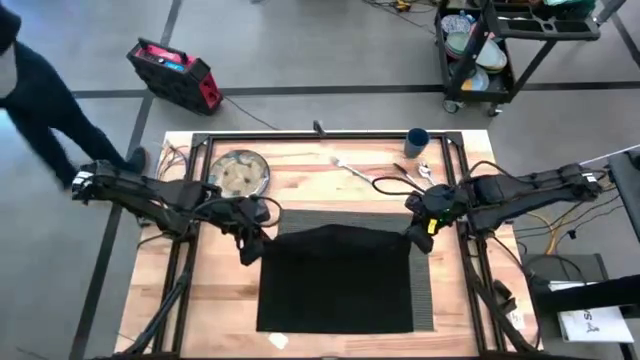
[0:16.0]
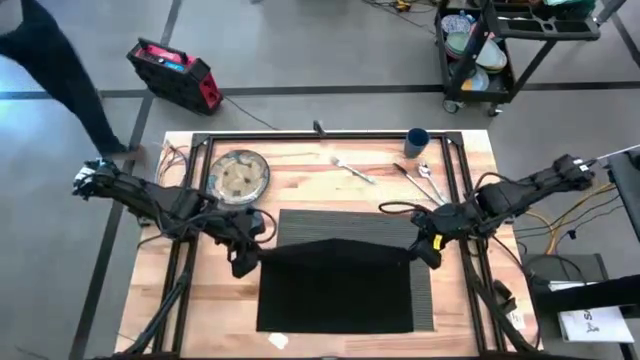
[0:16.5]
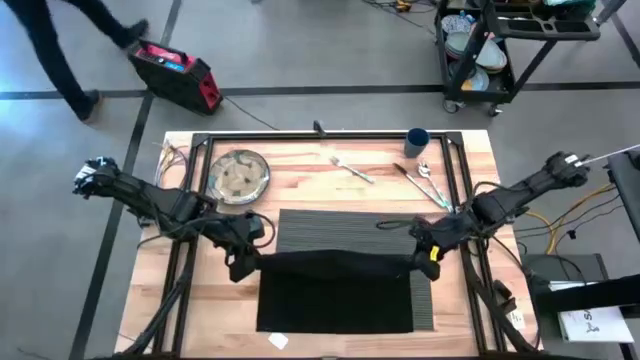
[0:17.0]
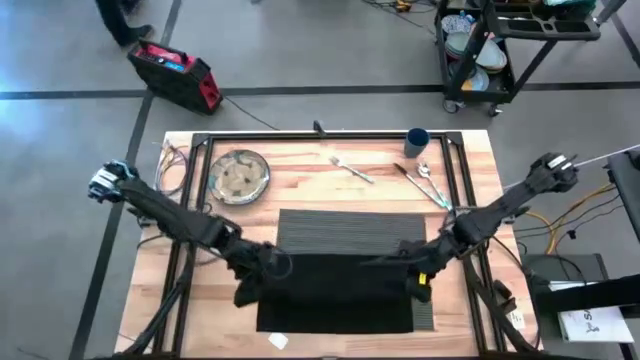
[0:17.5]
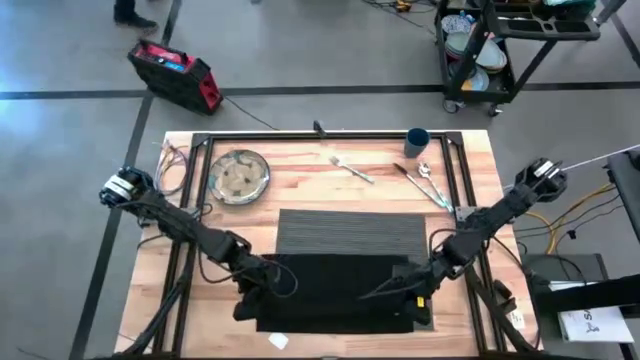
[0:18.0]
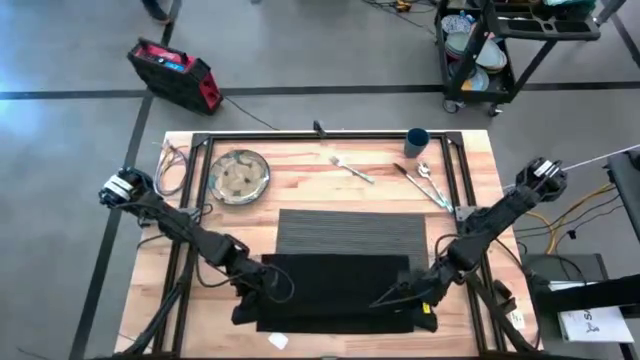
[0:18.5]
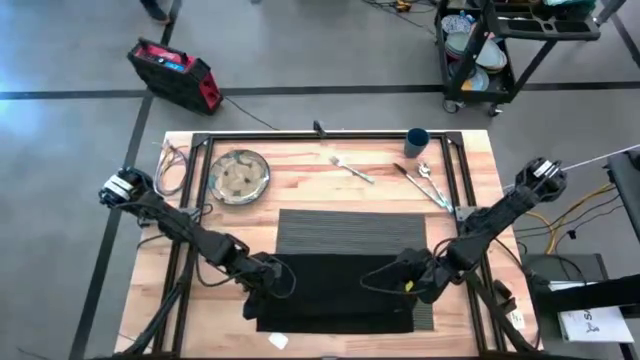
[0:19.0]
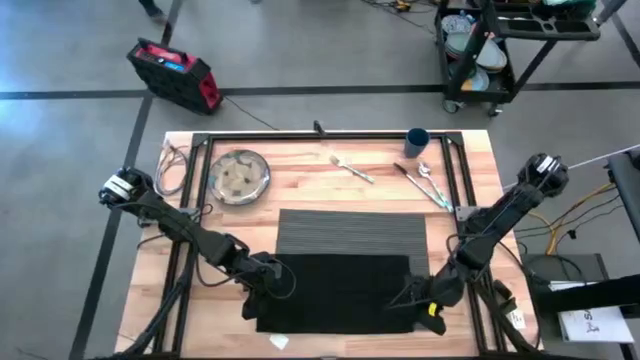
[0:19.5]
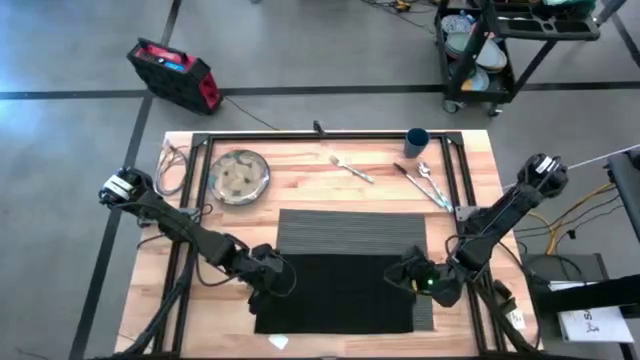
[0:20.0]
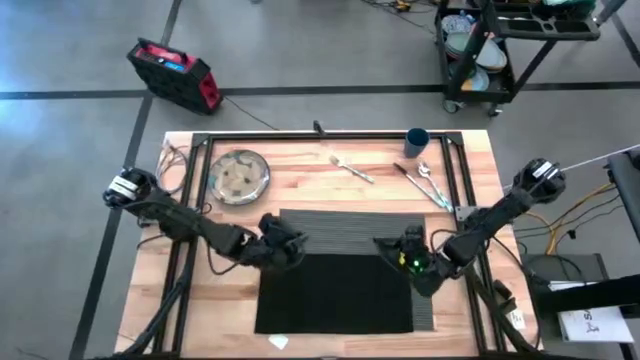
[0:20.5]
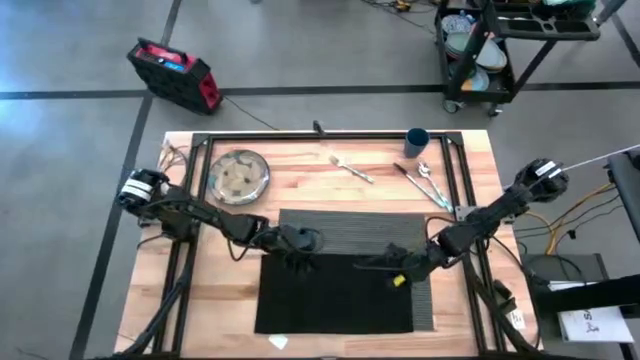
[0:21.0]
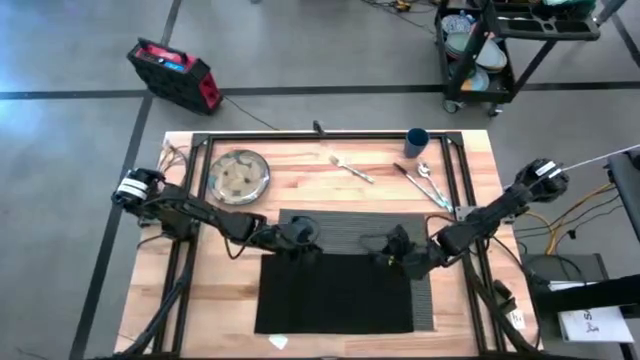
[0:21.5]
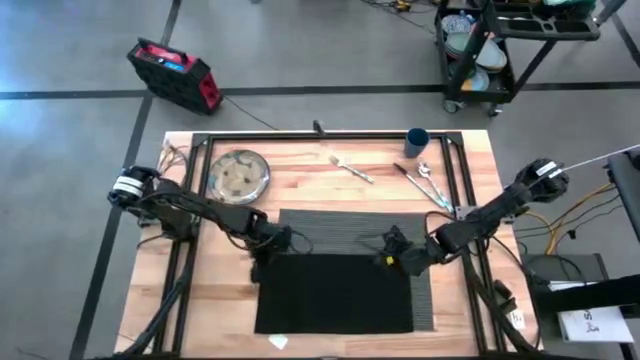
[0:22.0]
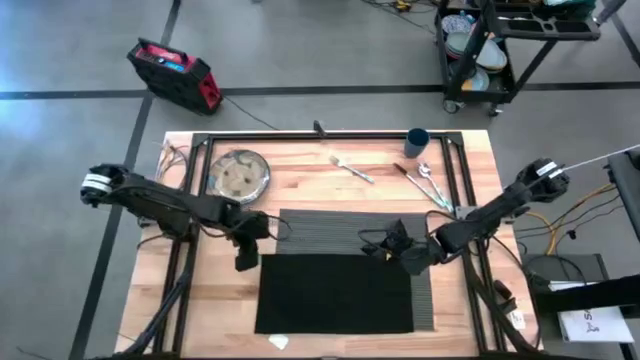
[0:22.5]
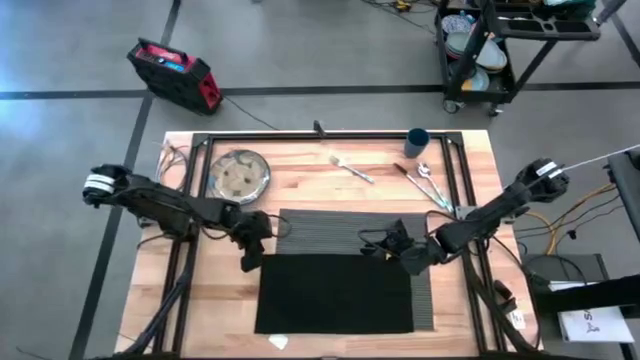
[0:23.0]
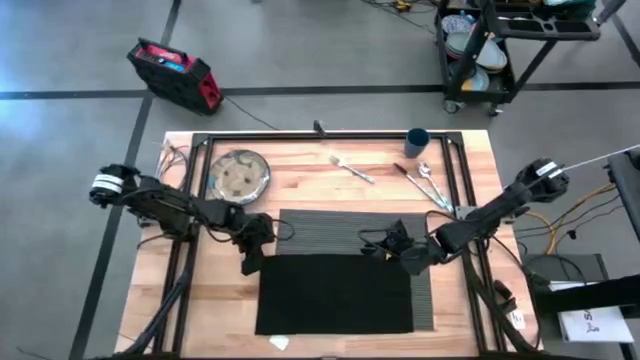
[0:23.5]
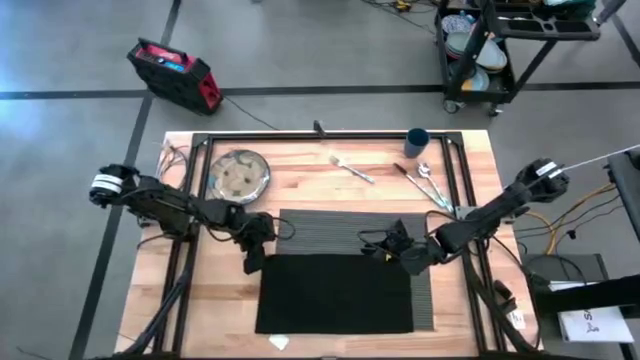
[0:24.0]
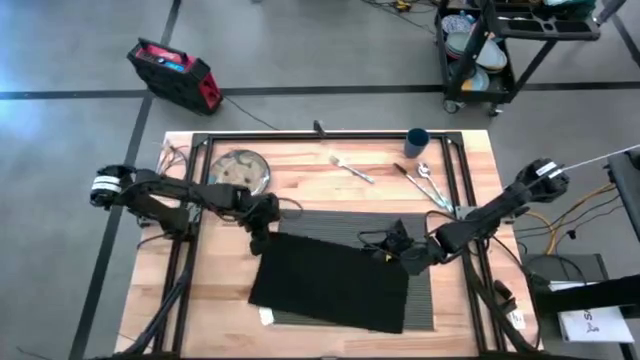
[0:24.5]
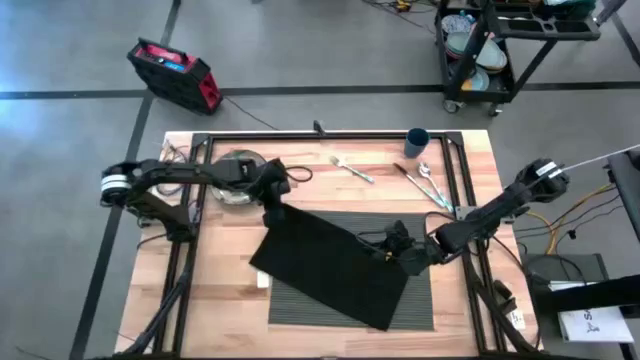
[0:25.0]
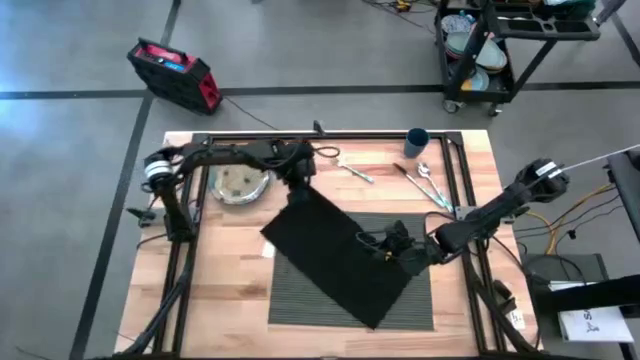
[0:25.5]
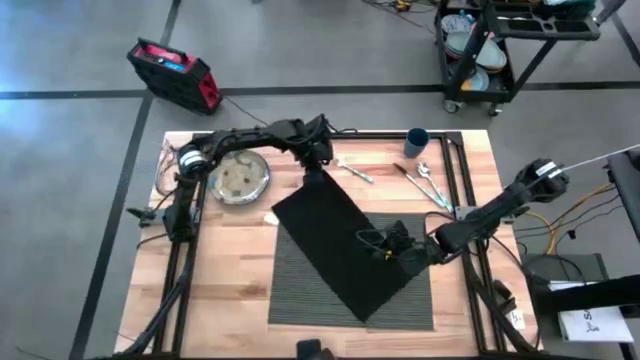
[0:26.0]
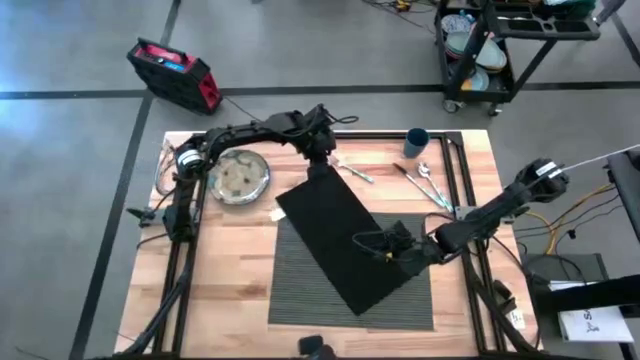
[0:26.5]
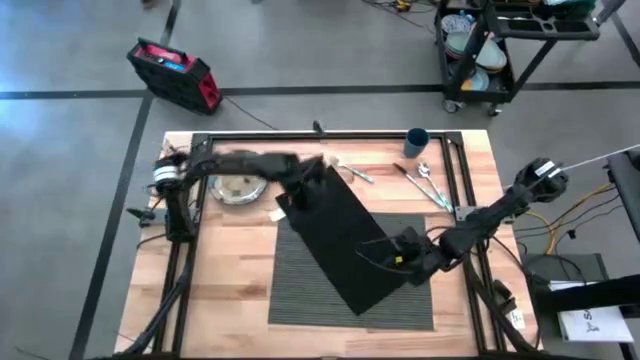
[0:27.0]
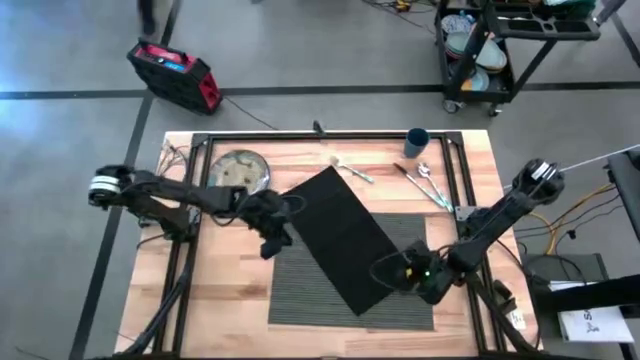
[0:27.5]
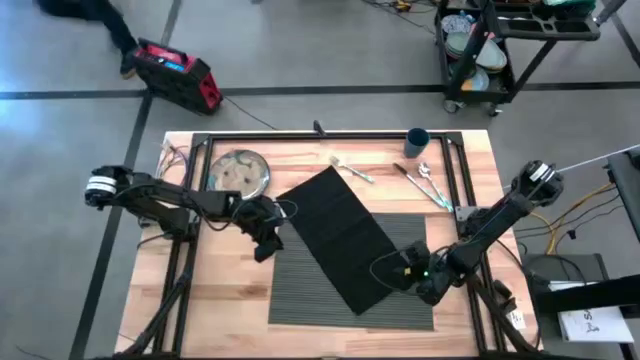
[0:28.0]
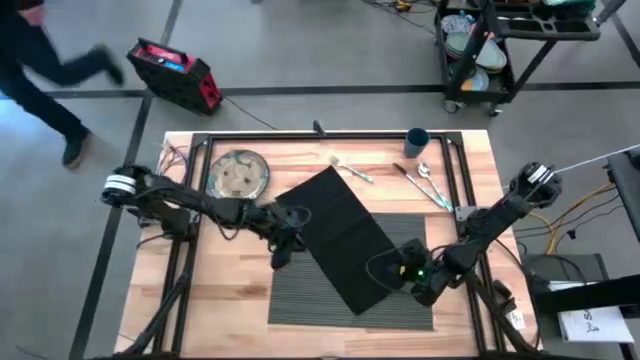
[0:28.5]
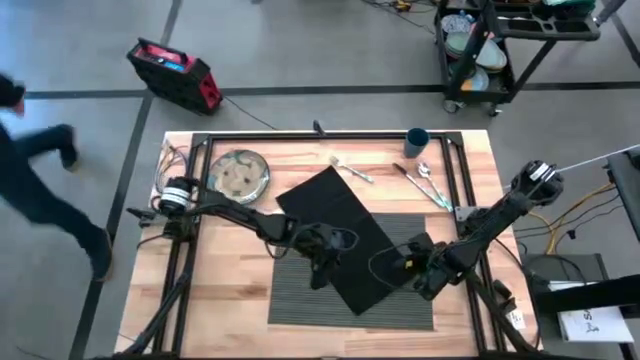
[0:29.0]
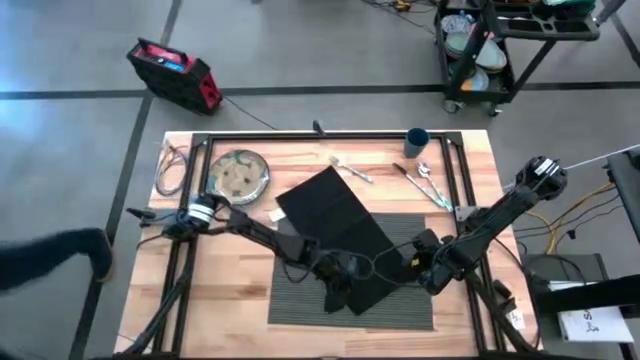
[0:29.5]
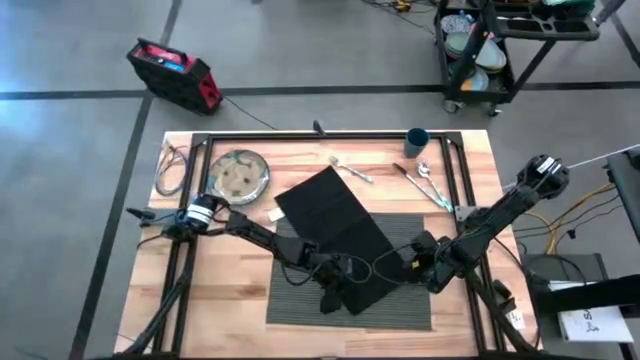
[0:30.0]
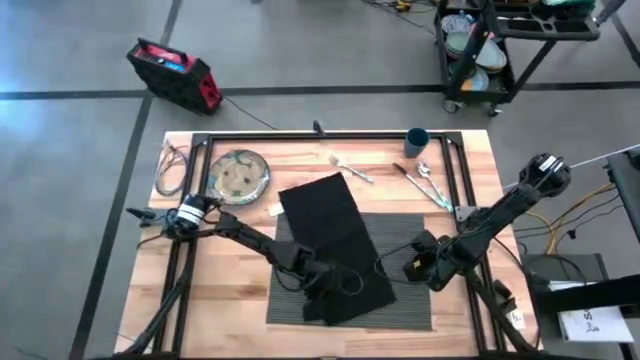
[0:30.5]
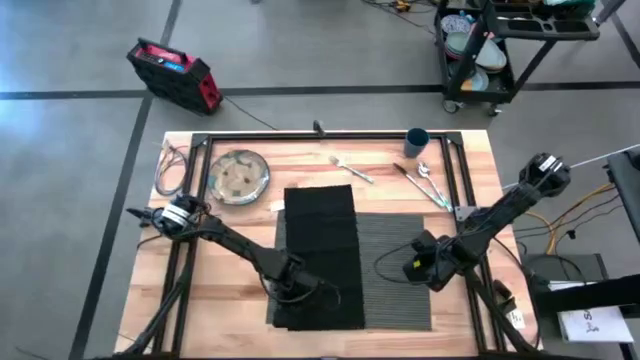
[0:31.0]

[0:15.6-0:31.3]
Task: Set table place
Fold the black napkin

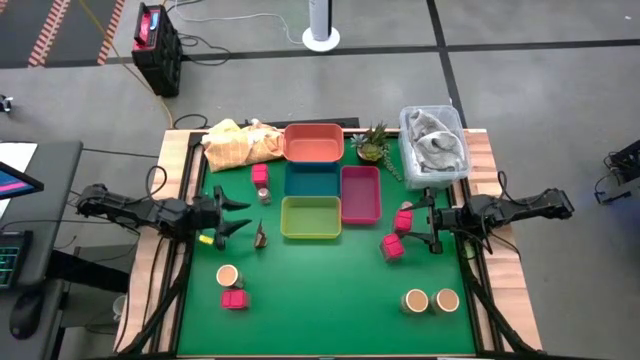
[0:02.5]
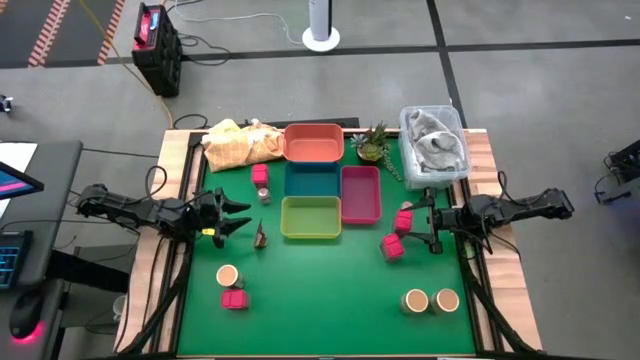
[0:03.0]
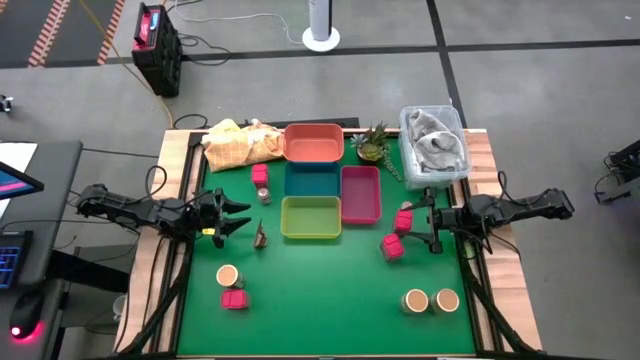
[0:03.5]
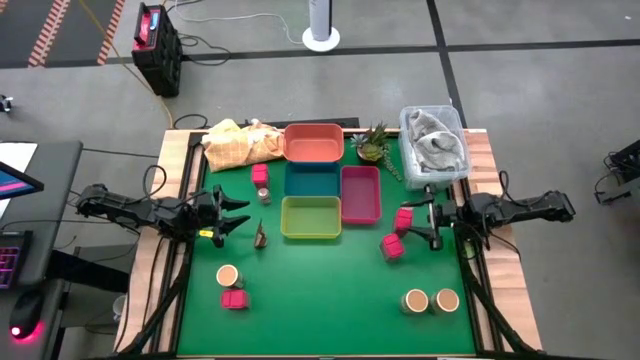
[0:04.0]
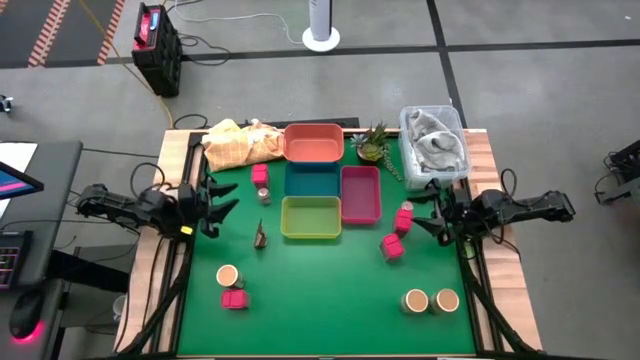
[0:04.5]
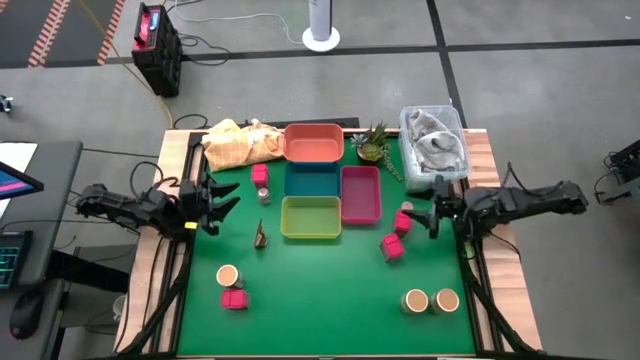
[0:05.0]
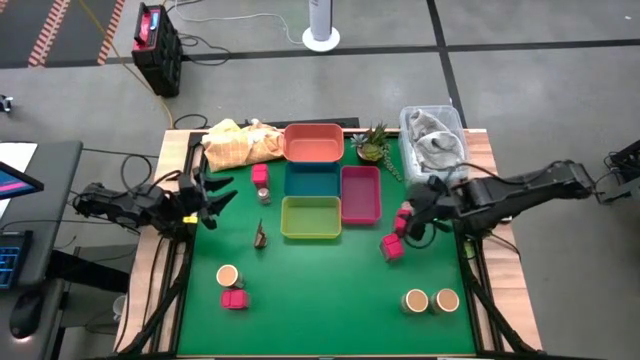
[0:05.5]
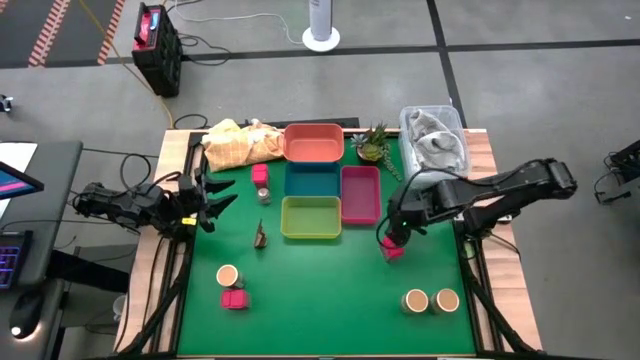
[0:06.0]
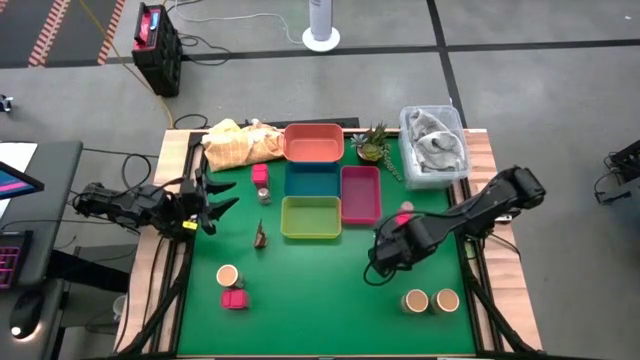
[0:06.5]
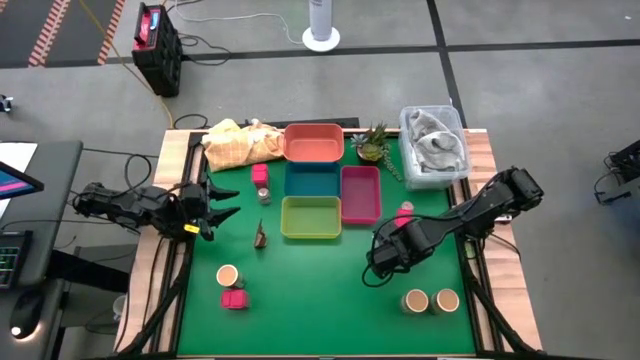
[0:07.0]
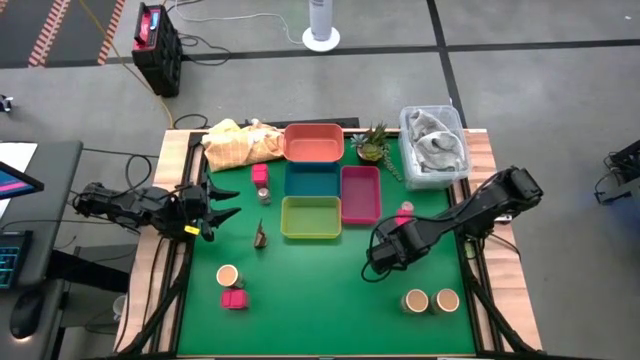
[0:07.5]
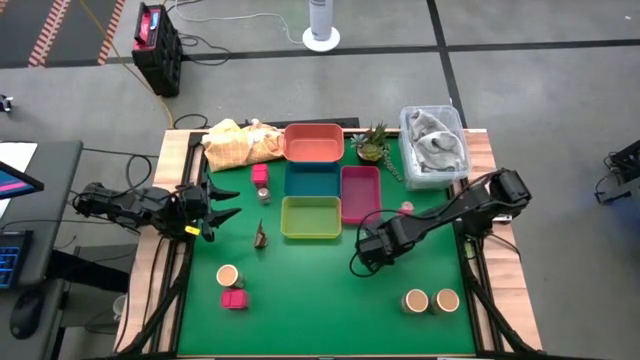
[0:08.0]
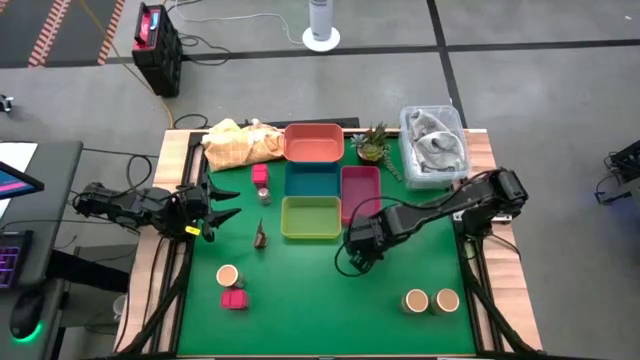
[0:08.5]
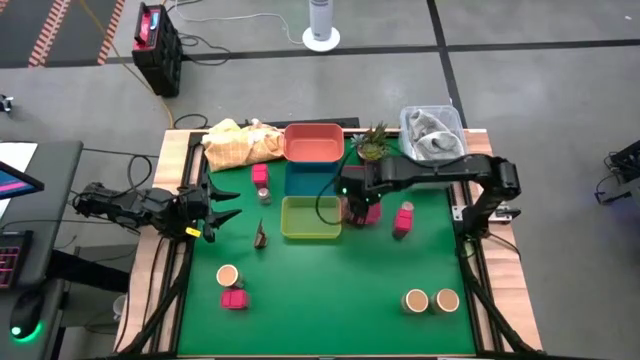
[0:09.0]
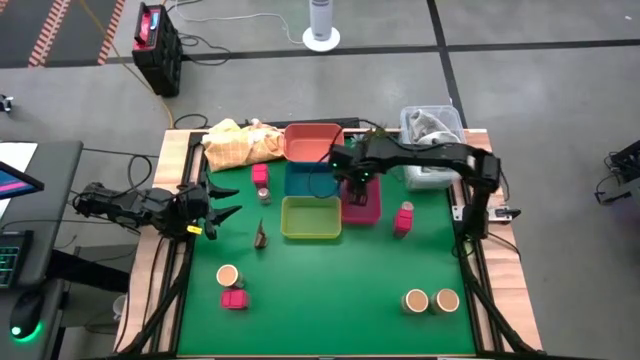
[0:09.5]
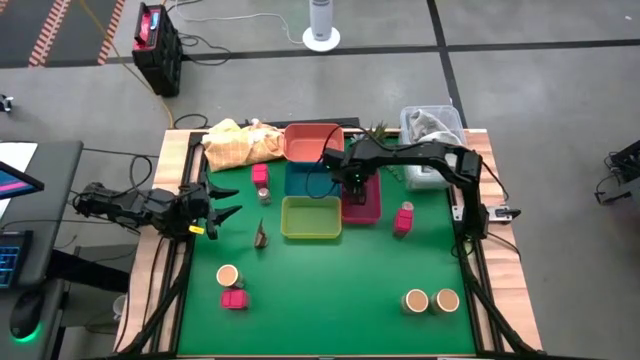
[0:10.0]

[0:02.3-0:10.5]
Task: Sort spices by type
Put the bottom right red seasoning can into the red bin
